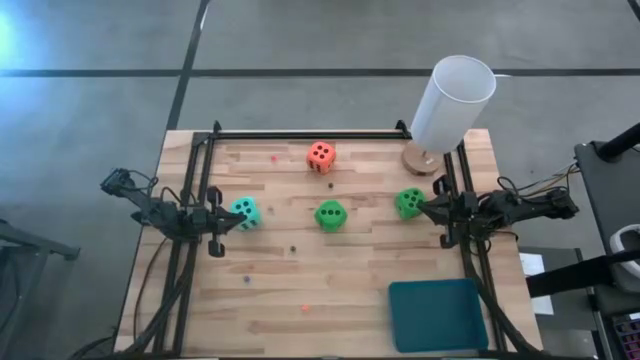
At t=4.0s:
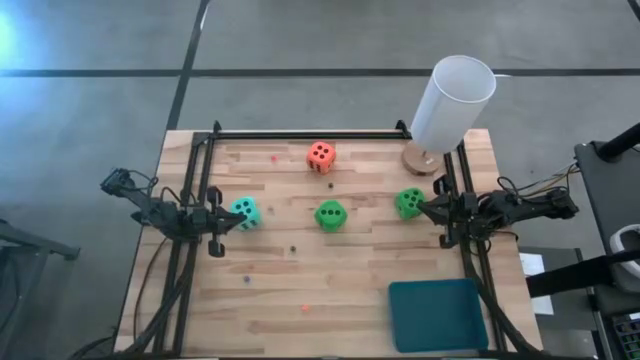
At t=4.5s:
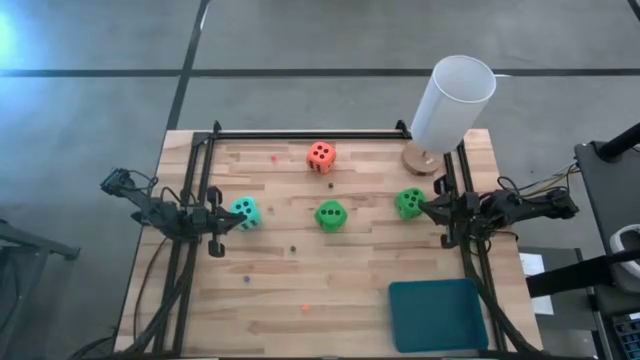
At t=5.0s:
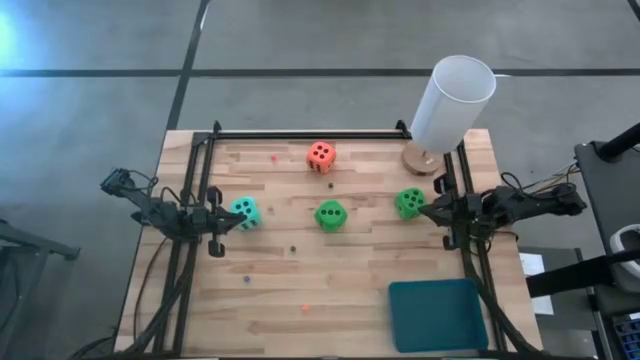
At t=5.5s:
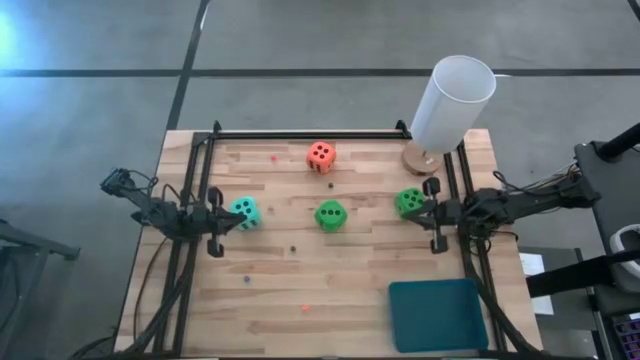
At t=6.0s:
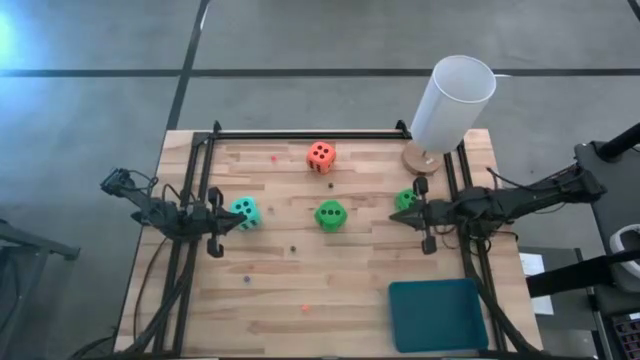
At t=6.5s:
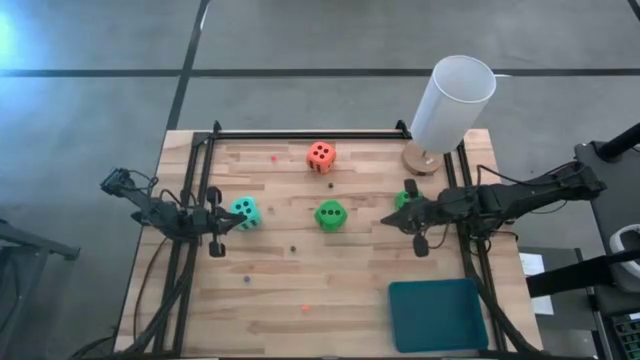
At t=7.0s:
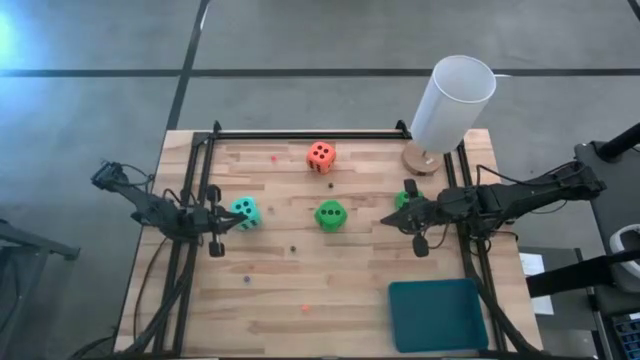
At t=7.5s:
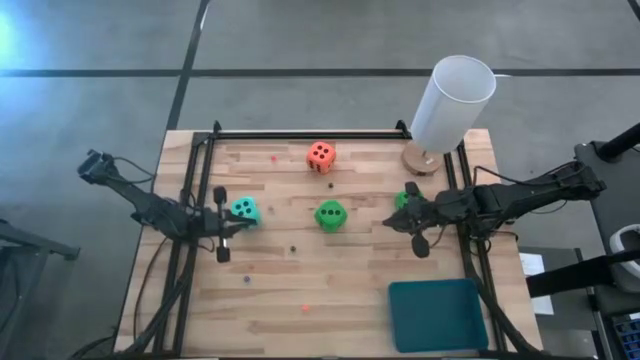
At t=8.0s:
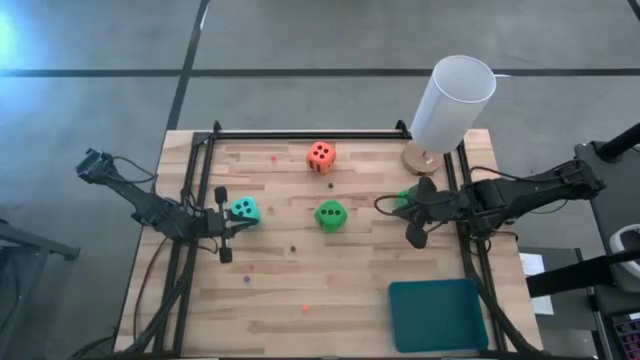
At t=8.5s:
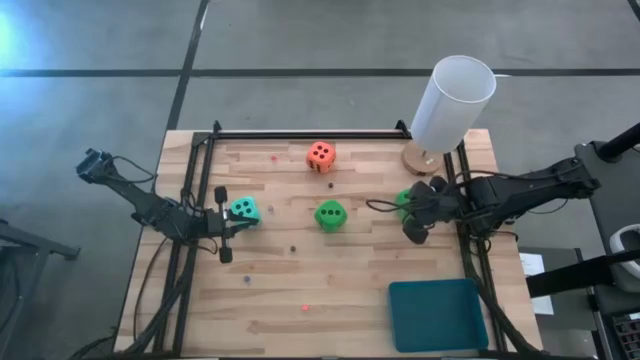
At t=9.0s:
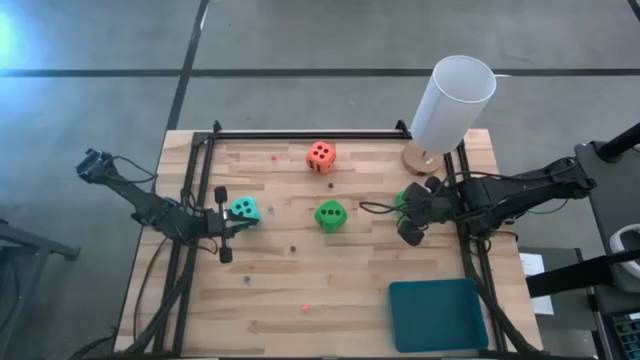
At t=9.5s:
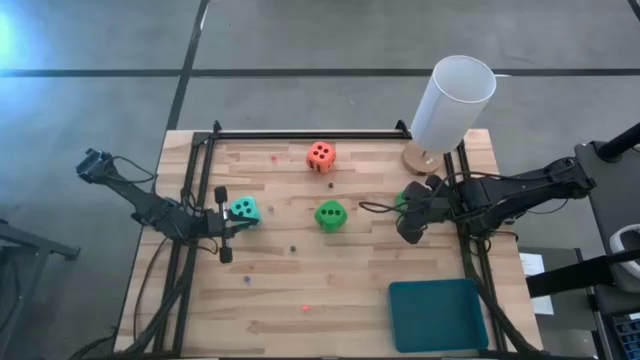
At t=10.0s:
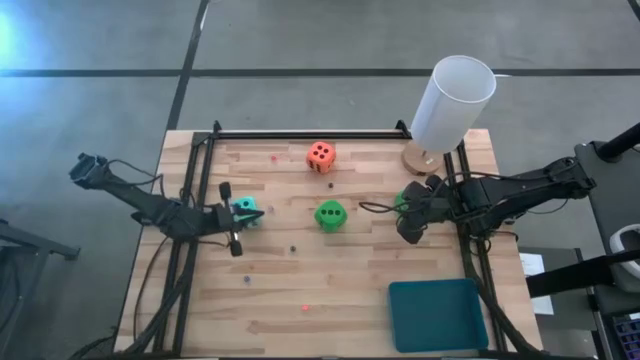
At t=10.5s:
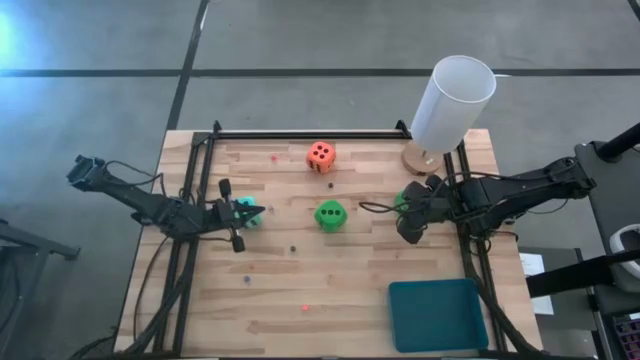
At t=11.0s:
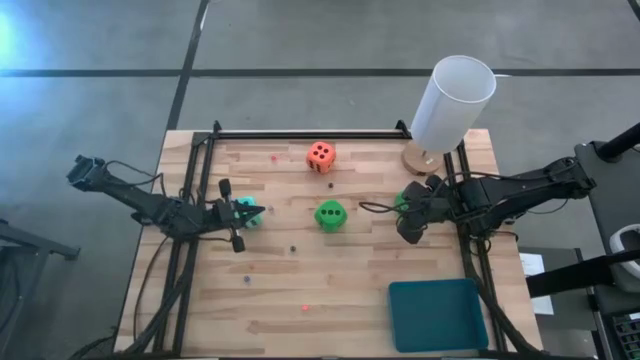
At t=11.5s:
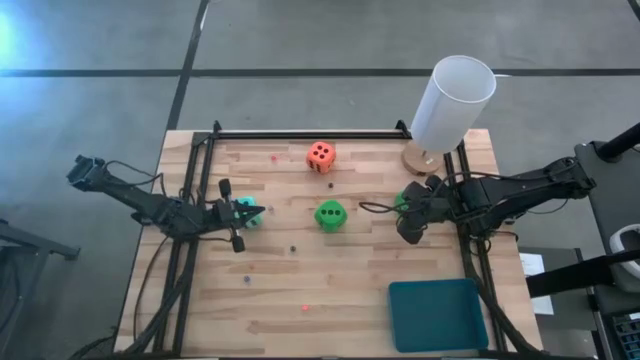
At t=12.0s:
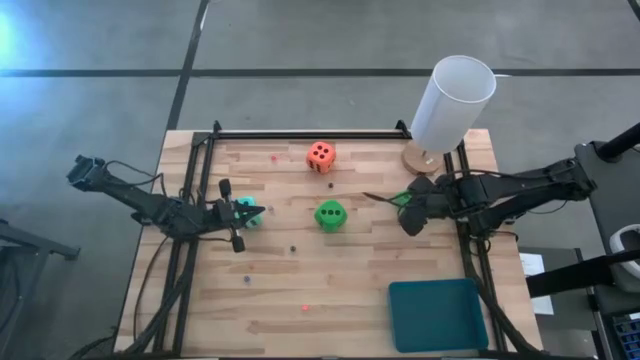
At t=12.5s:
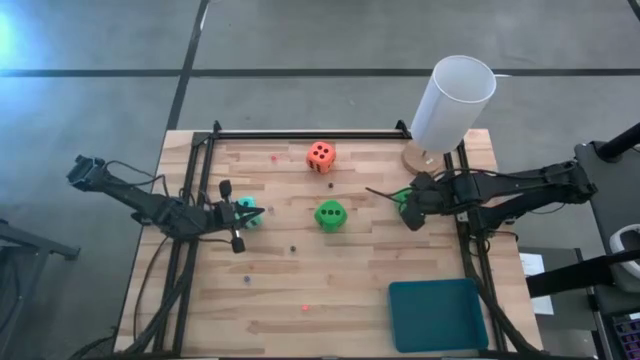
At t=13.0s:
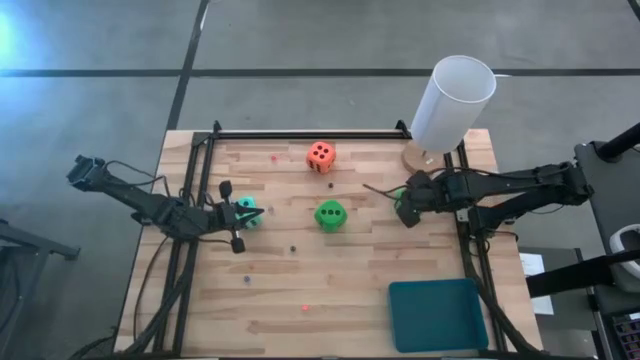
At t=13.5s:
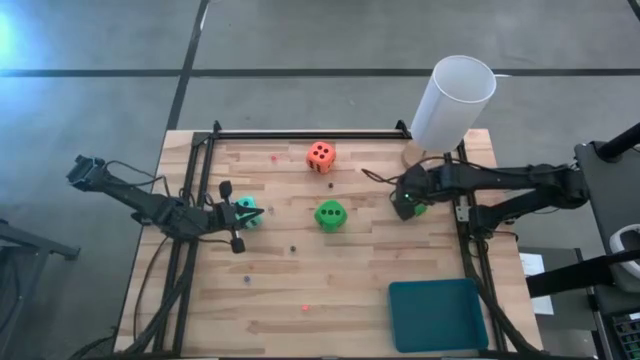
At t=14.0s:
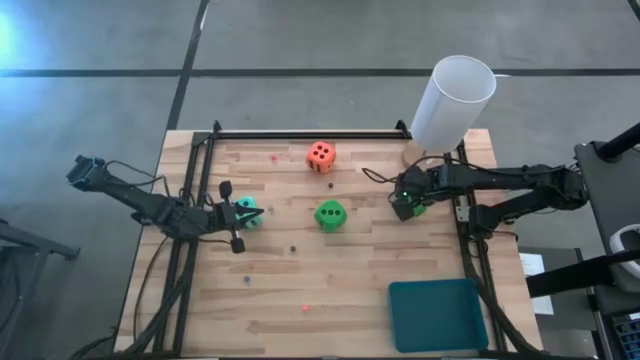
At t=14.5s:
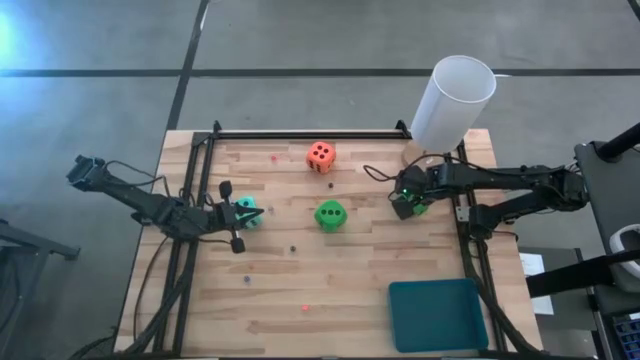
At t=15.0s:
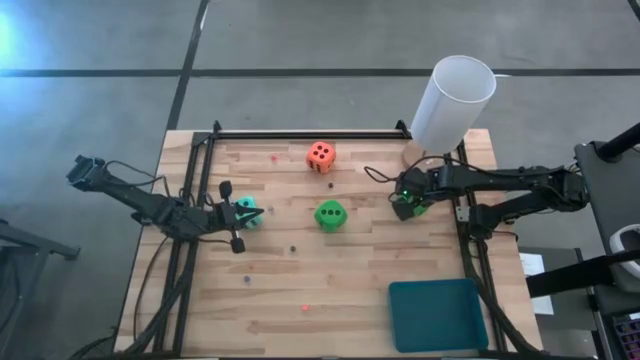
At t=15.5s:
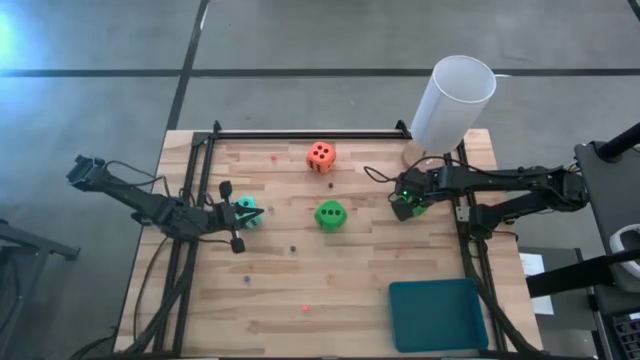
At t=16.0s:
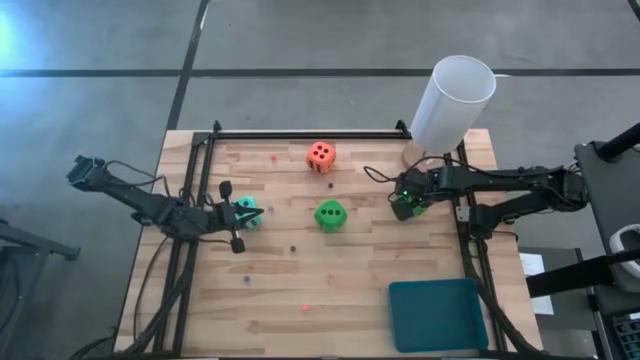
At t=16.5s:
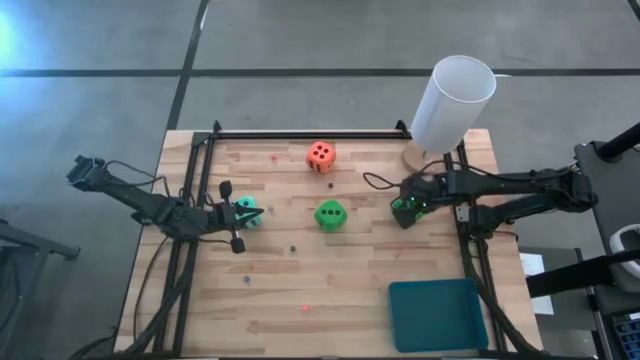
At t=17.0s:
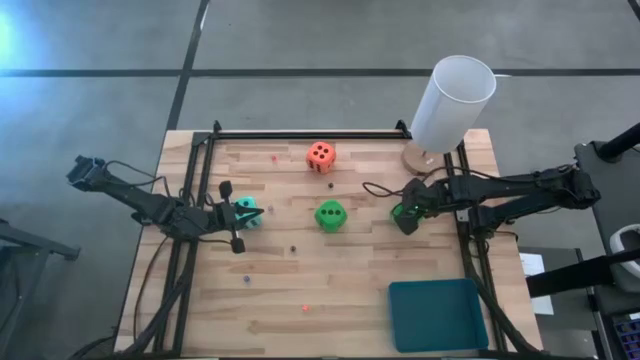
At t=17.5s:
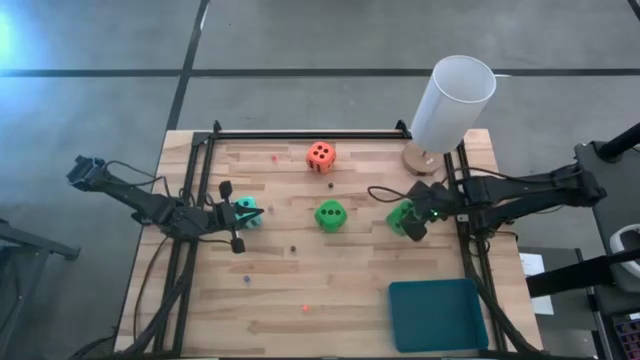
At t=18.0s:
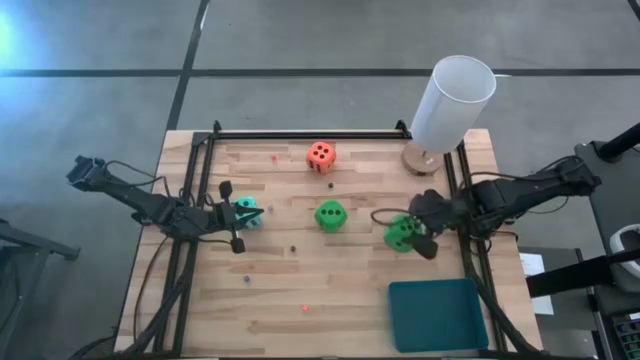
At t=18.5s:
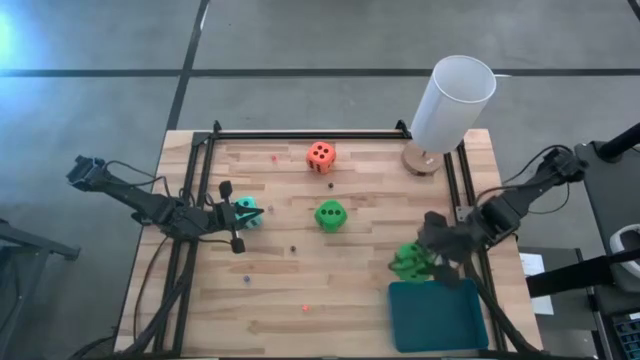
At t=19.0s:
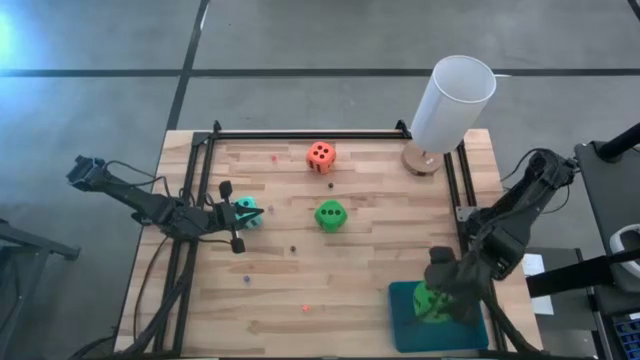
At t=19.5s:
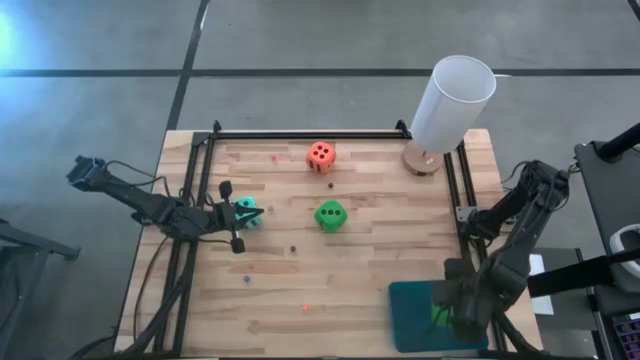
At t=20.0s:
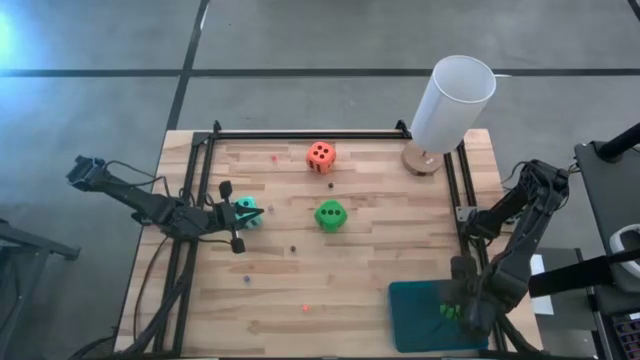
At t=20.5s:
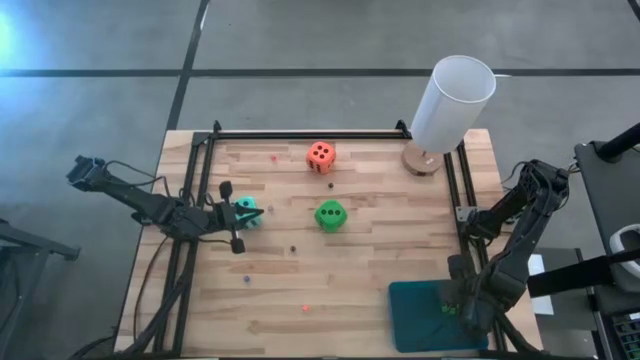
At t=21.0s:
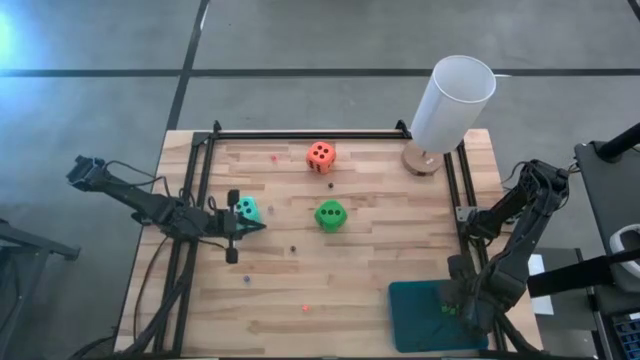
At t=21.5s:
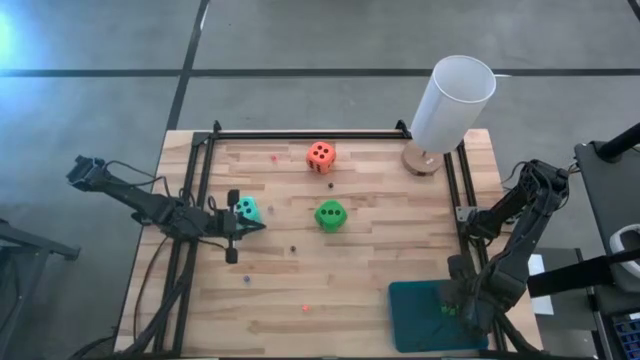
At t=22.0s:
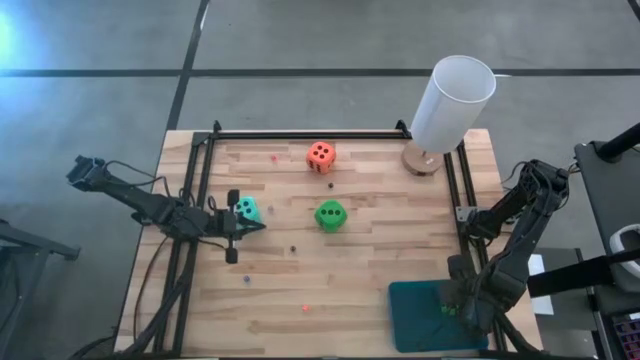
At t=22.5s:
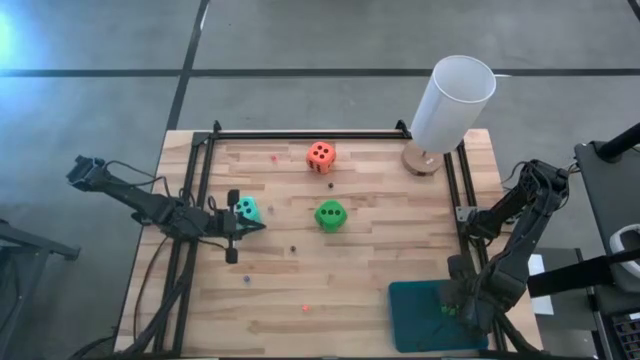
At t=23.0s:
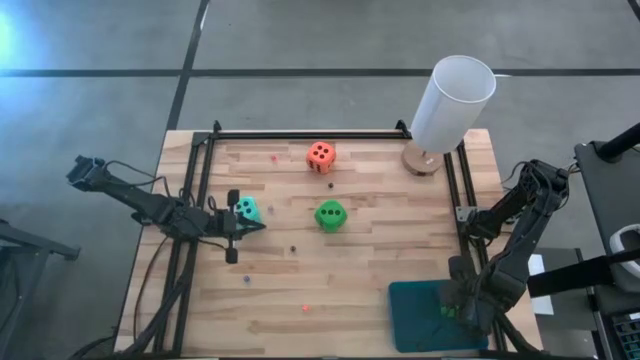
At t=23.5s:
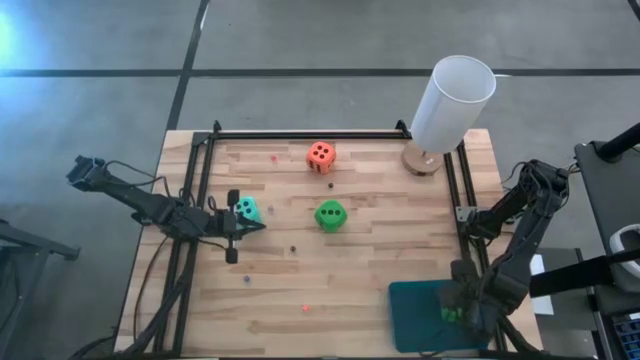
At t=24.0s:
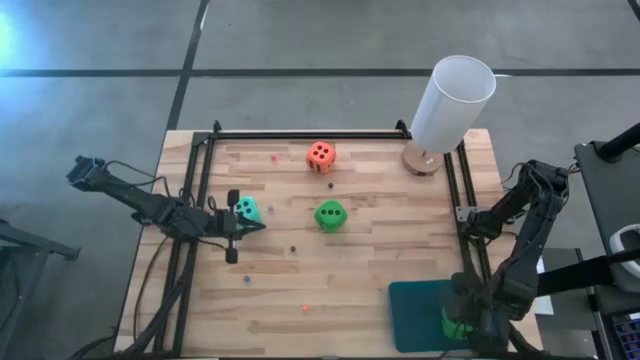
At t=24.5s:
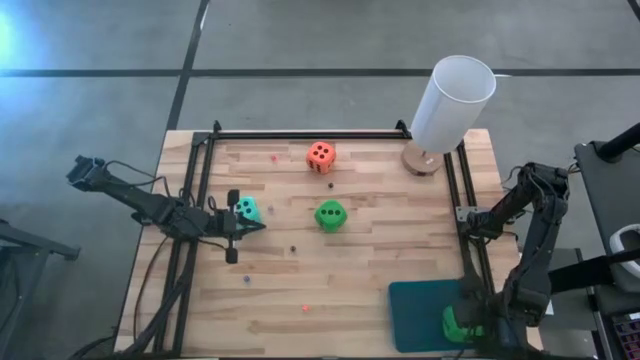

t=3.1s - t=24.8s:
Task: Pick & Place Dice
Put the right large green die into the blue bin
